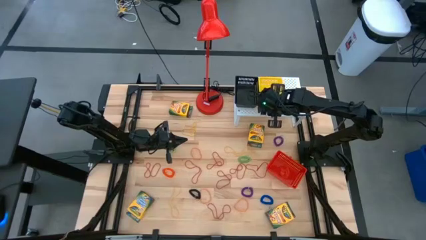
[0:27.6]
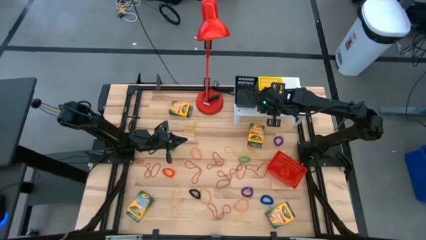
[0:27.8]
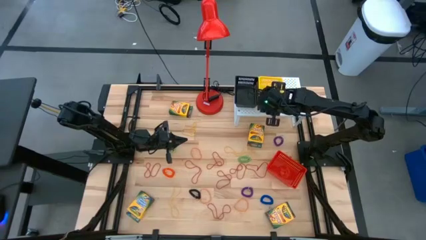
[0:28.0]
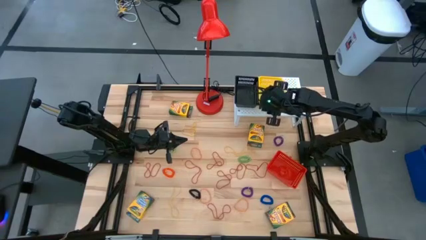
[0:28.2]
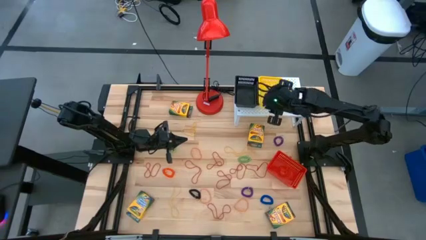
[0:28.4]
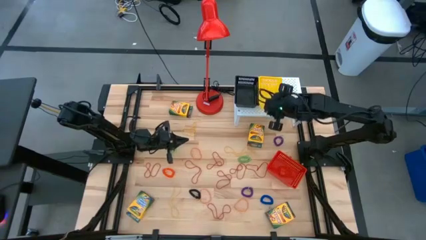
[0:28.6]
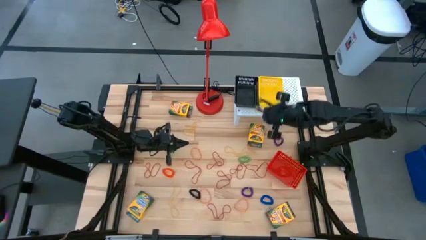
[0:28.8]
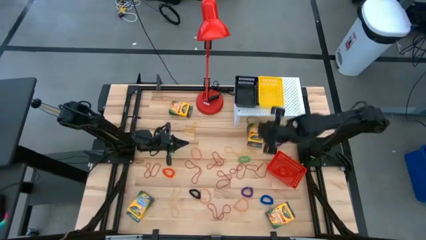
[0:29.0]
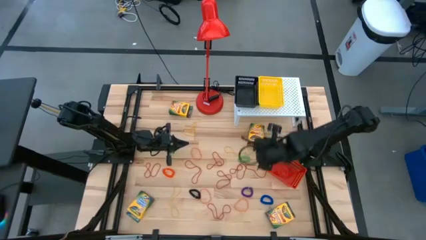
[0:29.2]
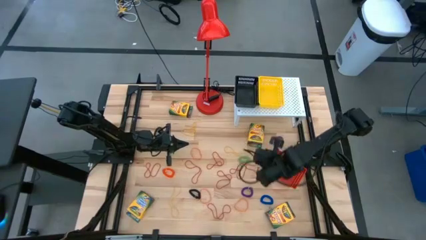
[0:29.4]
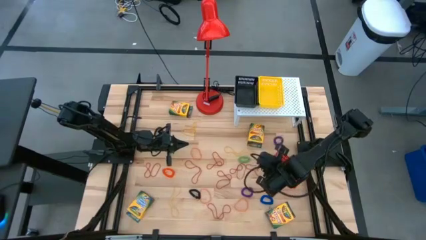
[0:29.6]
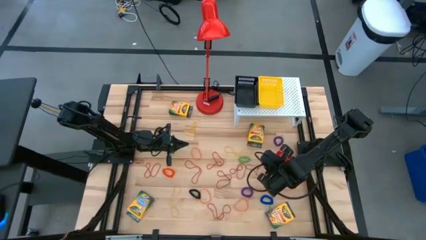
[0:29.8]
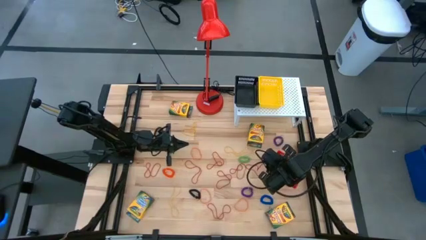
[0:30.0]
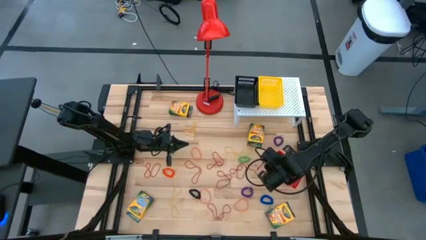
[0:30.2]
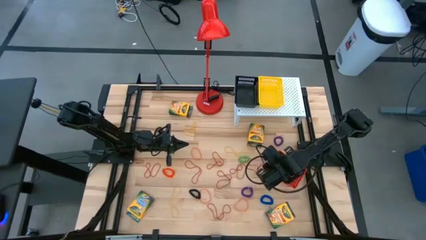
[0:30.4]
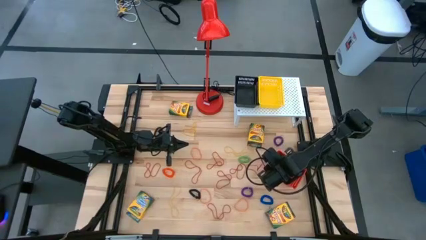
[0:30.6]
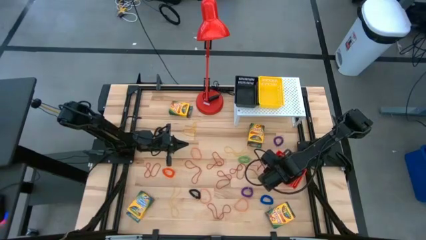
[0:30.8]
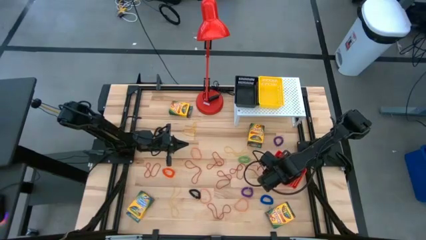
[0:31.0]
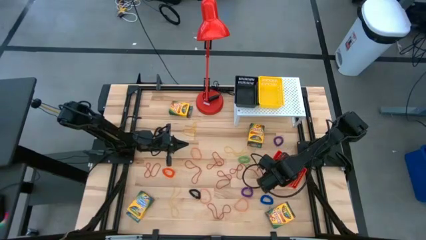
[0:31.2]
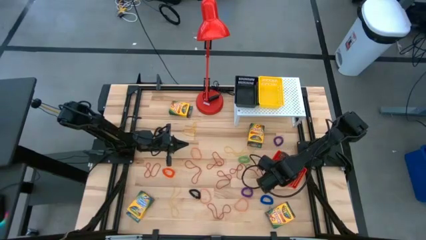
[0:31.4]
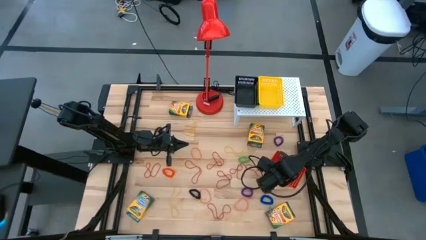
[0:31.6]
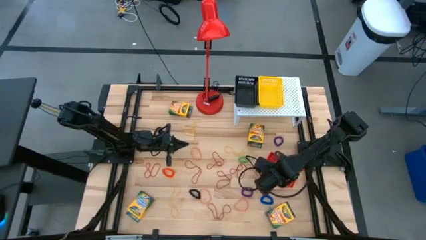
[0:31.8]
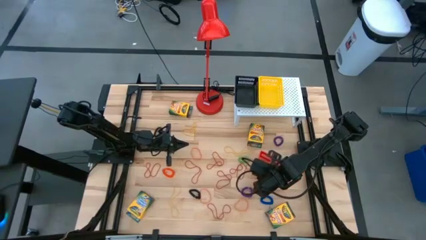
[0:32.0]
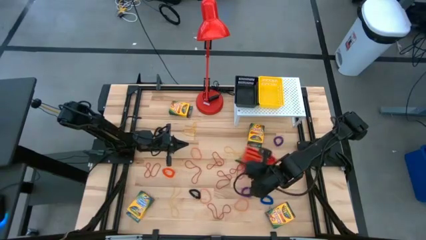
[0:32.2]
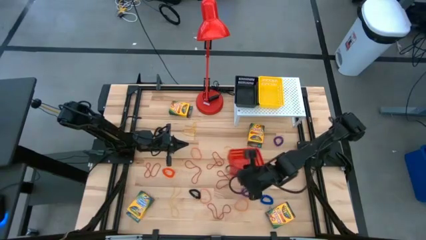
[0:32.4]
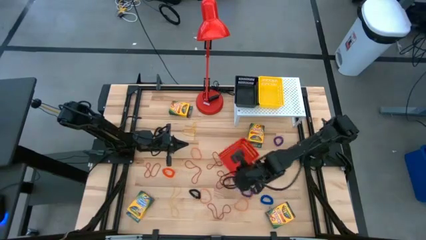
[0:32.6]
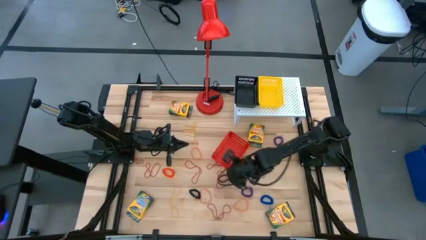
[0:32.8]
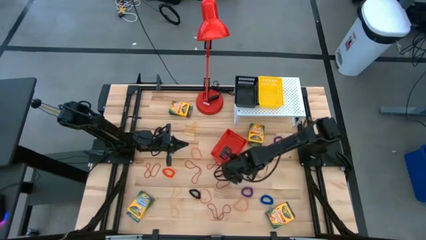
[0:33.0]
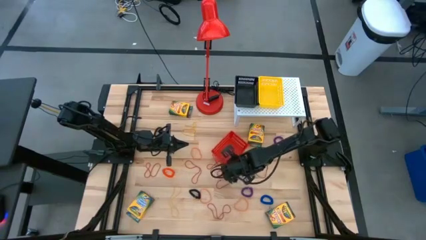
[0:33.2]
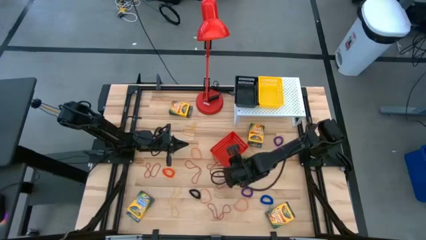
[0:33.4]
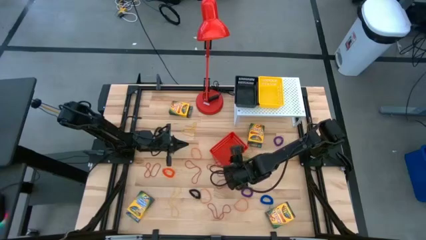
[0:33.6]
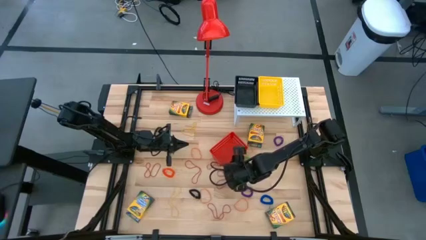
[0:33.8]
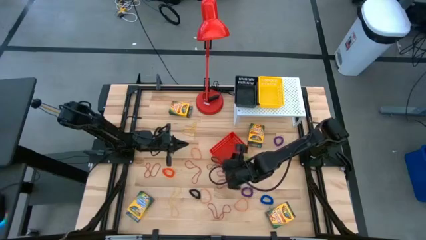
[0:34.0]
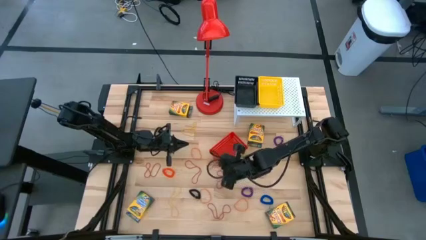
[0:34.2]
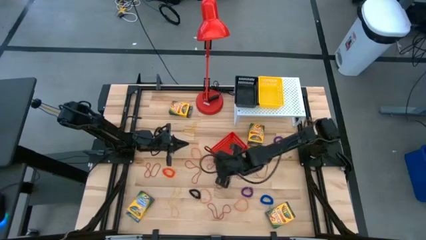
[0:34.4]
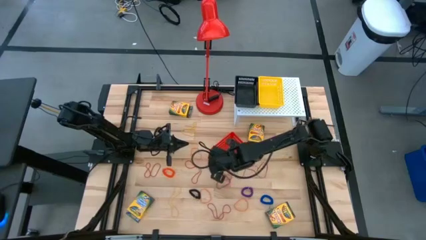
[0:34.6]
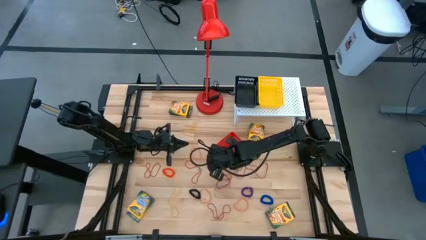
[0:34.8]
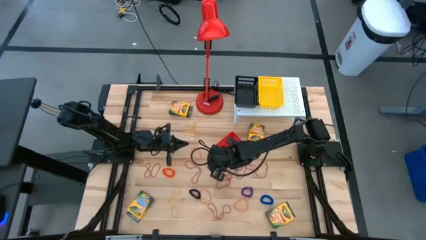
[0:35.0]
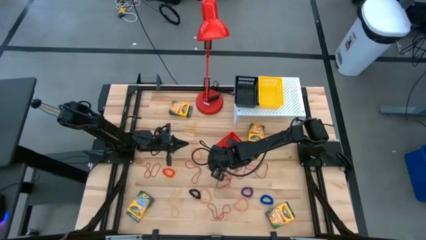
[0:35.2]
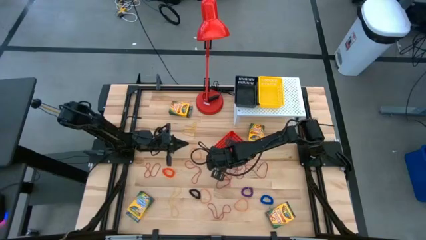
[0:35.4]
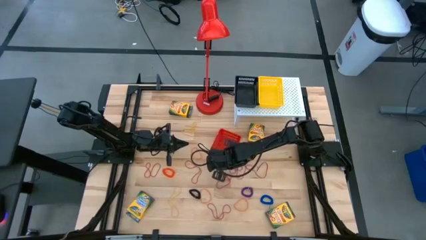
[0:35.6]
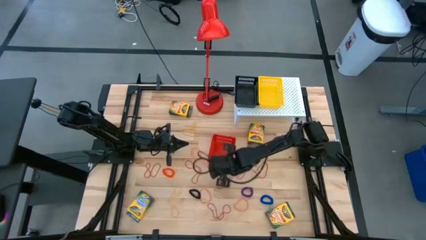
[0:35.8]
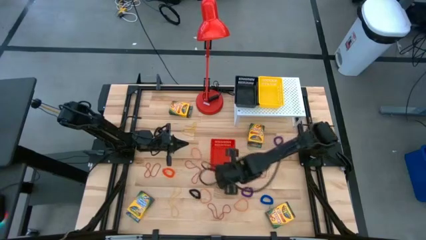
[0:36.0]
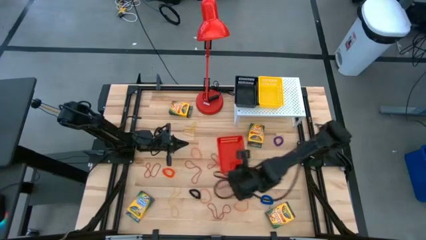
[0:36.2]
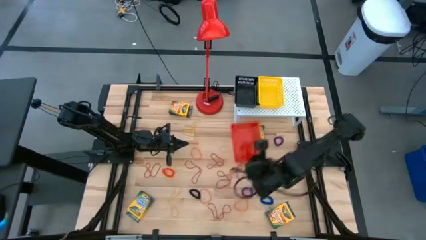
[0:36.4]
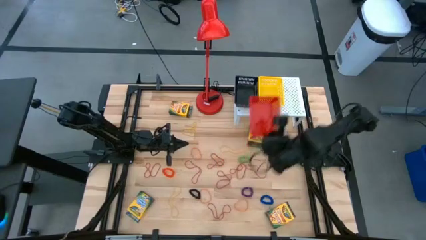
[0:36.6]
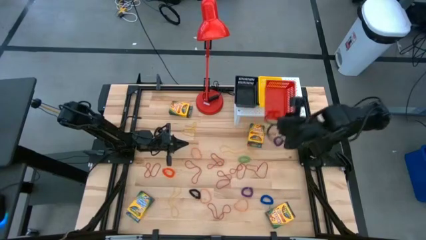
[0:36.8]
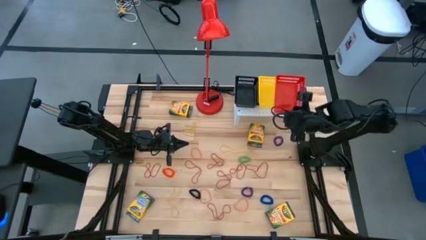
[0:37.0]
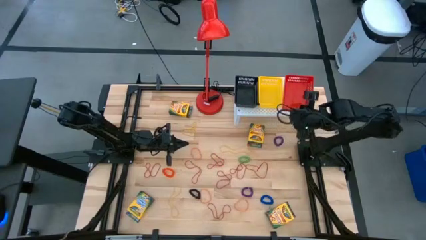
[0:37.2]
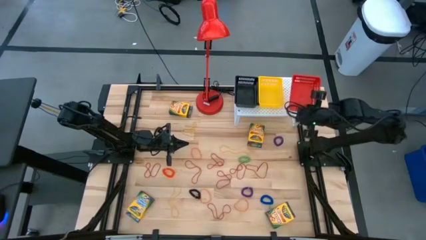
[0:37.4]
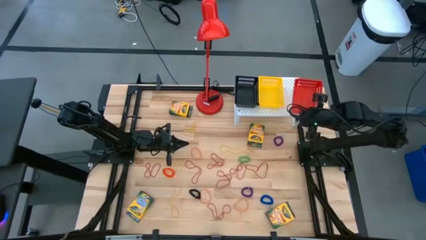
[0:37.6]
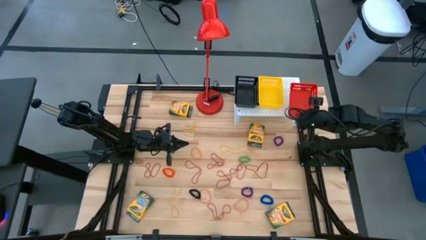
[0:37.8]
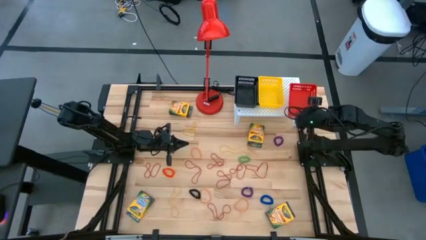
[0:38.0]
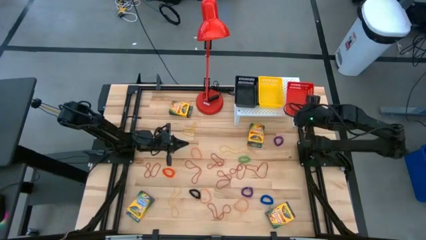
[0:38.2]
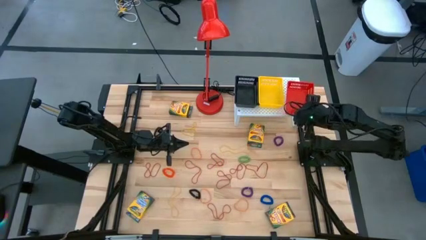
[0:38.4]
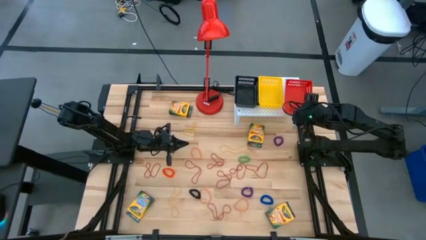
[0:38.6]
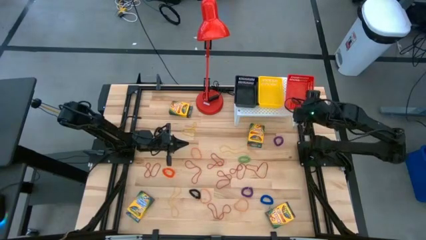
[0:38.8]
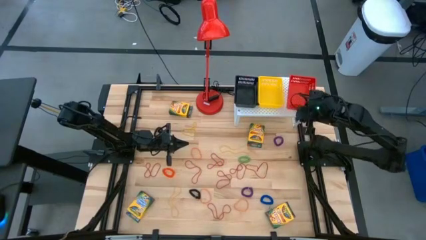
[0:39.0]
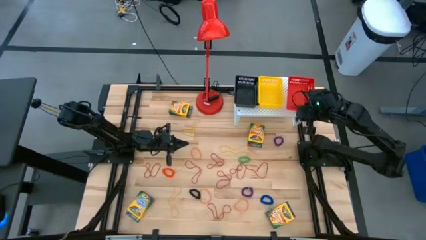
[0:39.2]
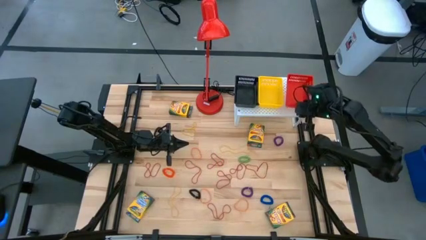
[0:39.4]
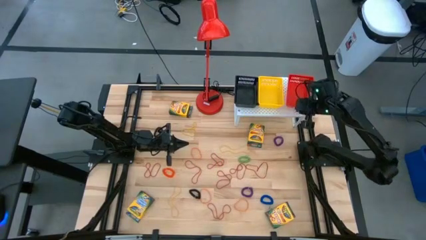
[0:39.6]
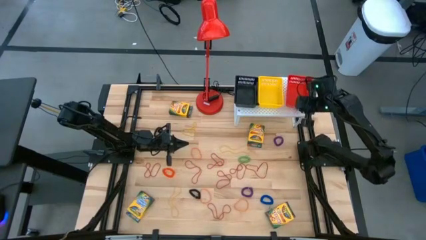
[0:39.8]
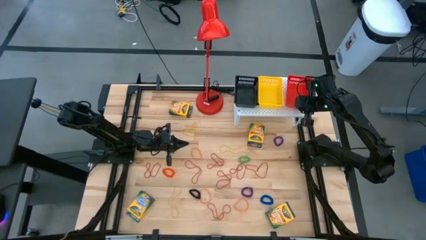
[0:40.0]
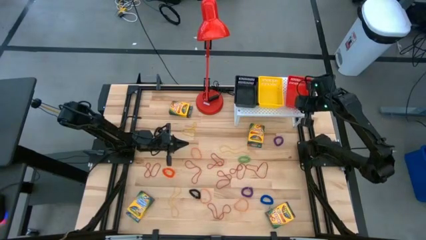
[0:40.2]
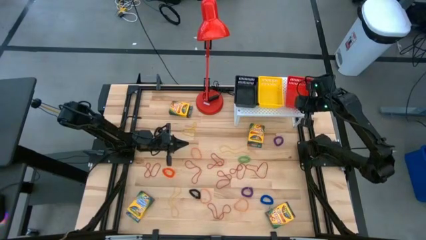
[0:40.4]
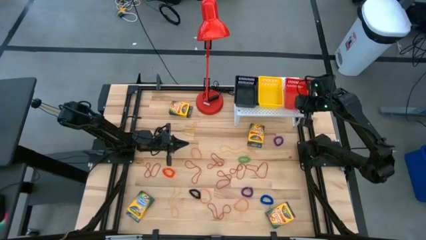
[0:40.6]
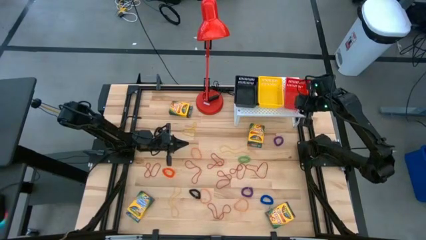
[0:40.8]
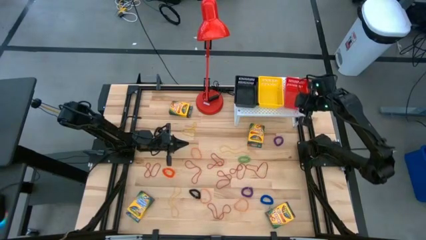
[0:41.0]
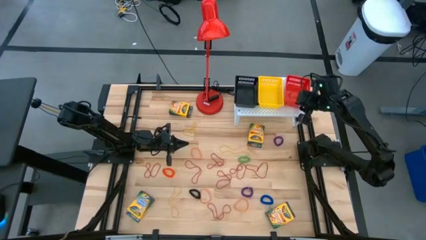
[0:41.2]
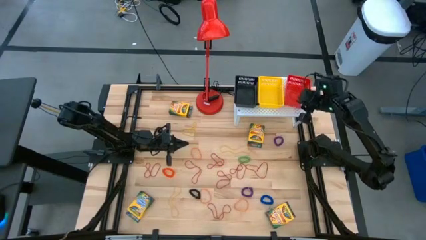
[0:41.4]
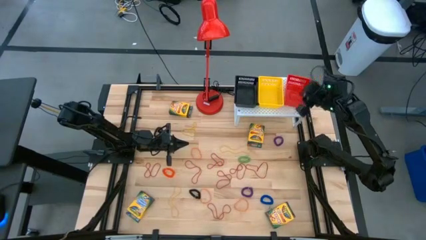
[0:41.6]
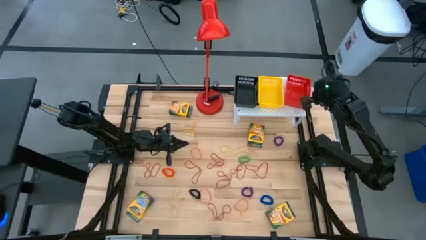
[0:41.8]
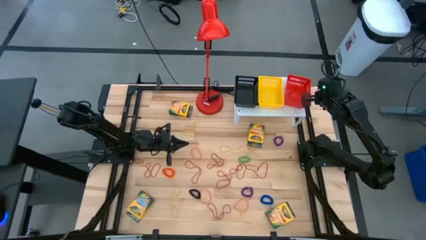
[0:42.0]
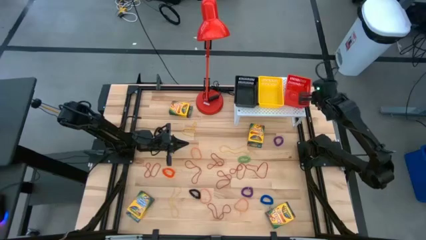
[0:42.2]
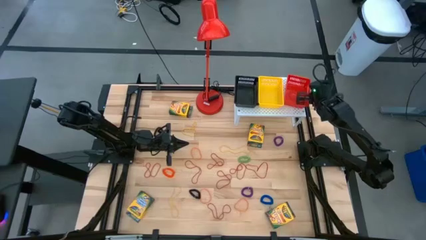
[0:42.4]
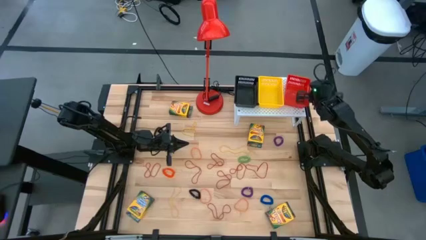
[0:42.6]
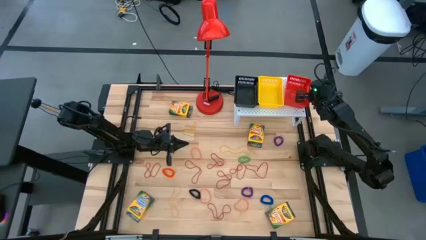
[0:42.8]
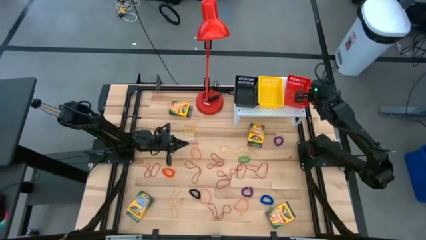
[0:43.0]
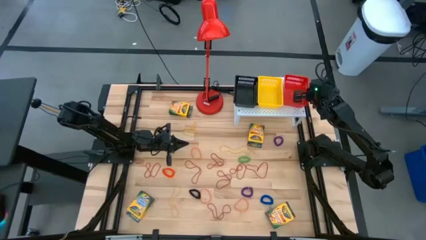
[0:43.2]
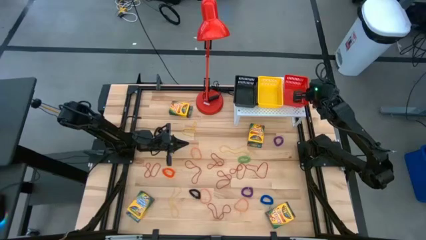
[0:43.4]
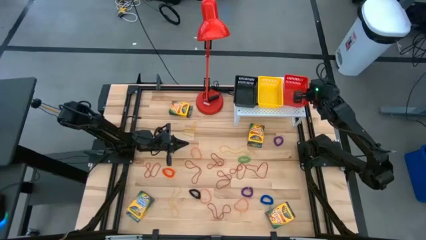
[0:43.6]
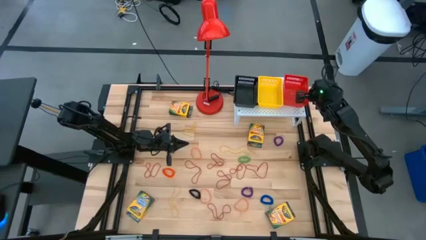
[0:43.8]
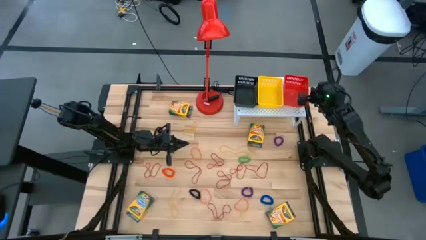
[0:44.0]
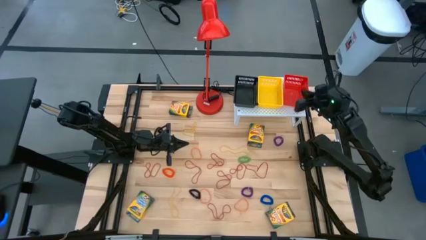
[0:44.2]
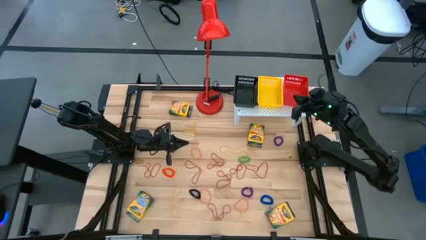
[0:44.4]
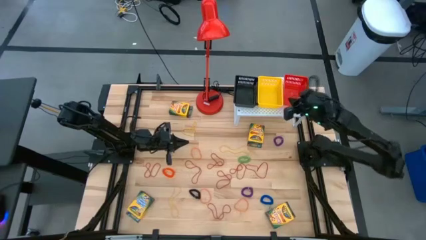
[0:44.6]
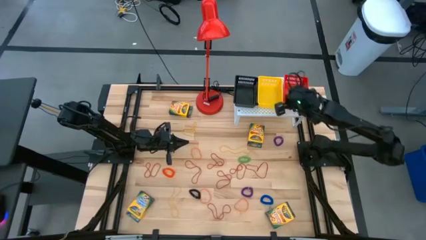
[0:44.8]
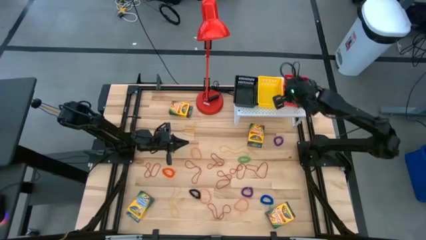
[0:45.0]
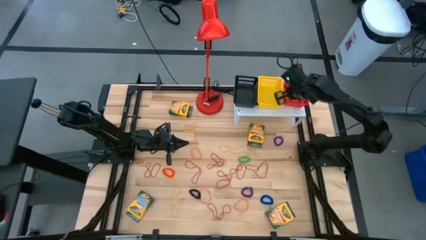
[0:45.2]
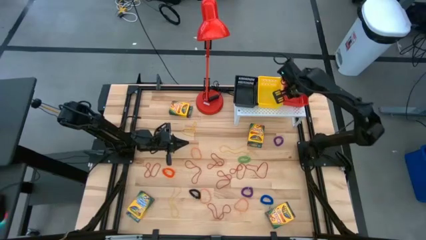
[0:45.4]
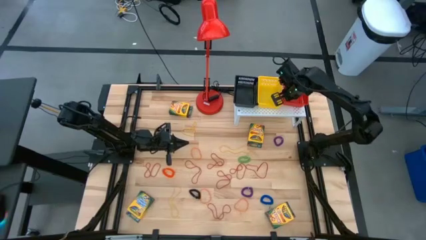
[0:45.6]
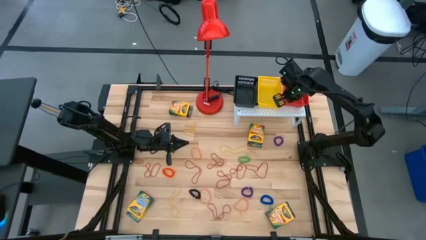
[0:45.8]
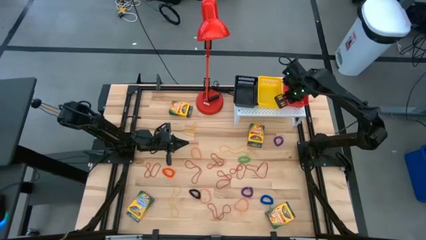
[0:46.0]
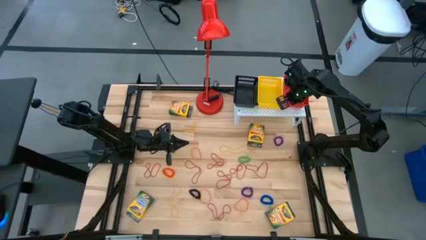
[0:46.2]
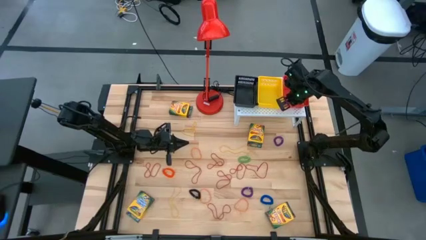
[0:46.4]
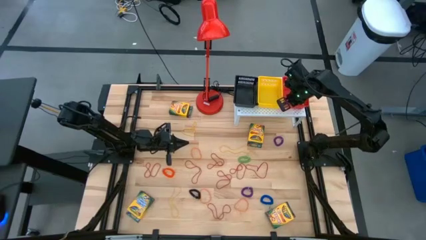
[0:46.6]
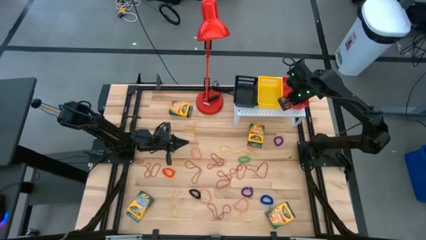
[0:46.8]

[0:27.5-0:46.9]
Task: Pick & Place Office Desk Supplies
Put the red bin onto the shelf
